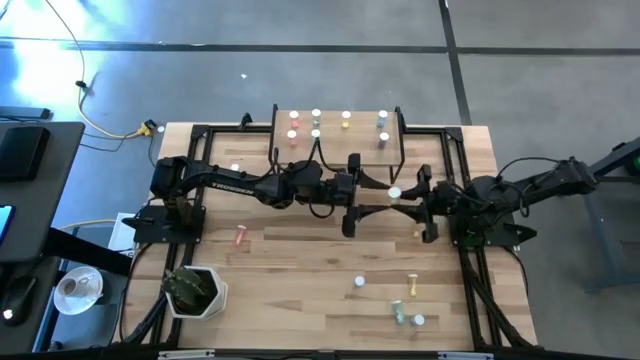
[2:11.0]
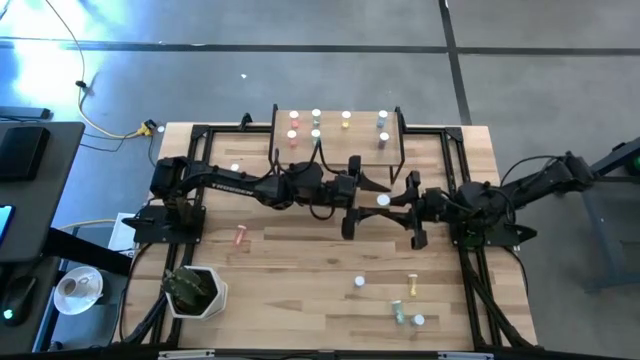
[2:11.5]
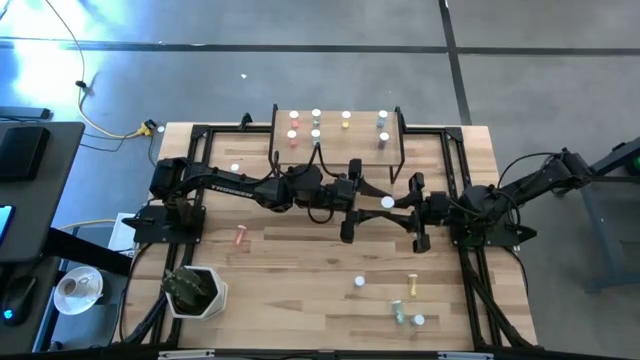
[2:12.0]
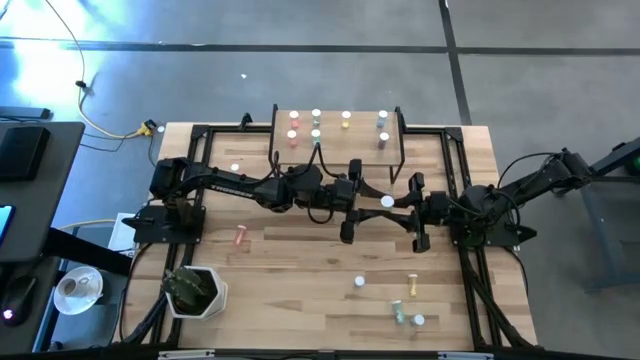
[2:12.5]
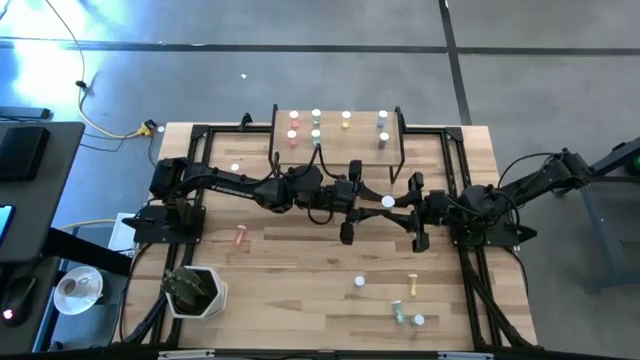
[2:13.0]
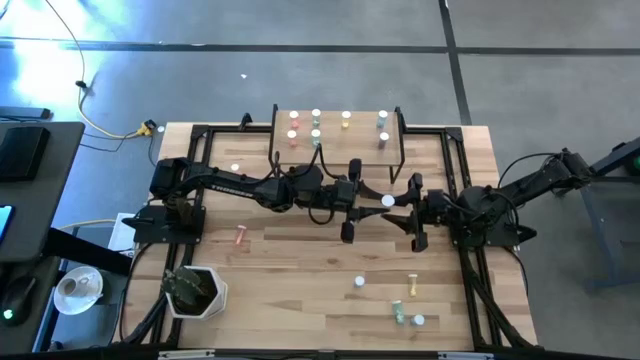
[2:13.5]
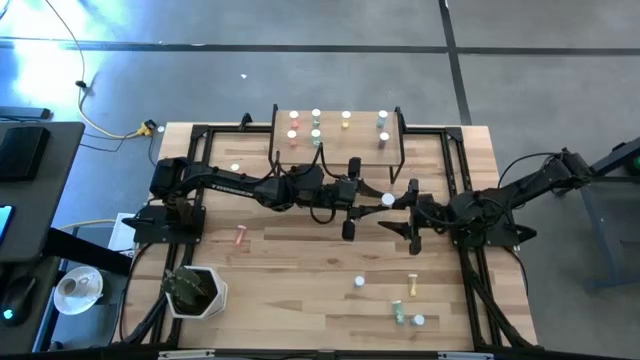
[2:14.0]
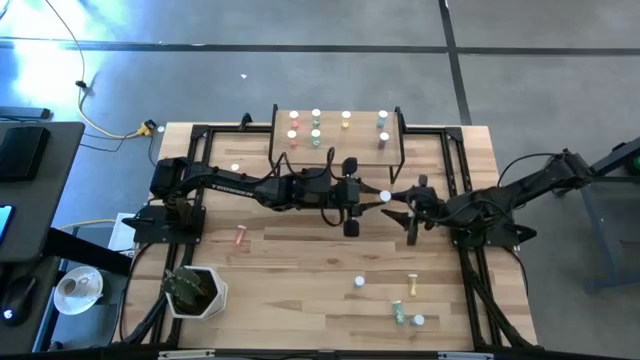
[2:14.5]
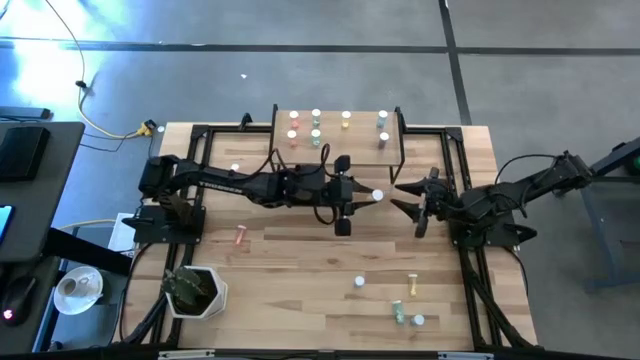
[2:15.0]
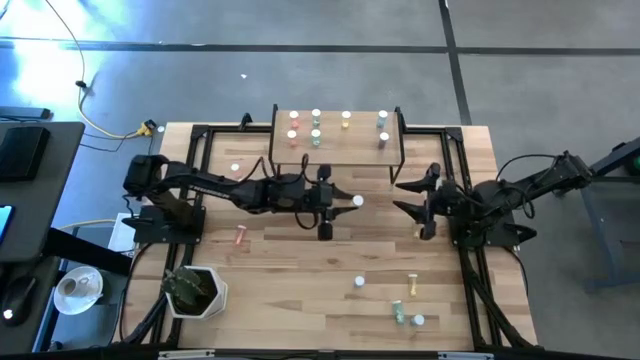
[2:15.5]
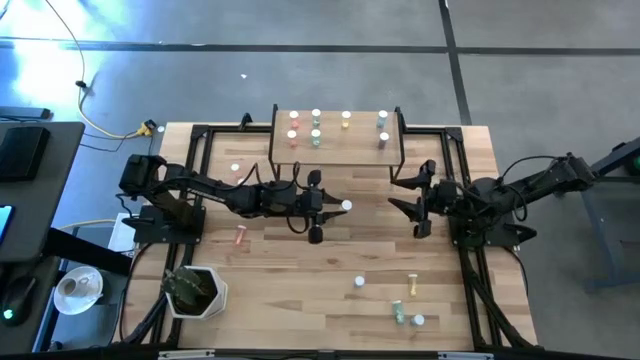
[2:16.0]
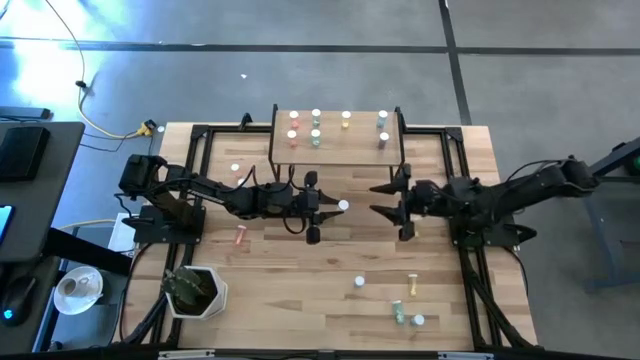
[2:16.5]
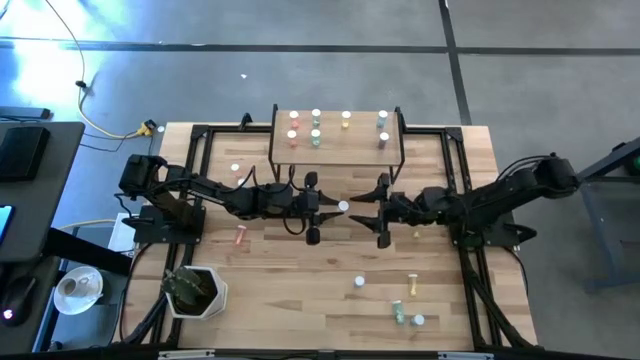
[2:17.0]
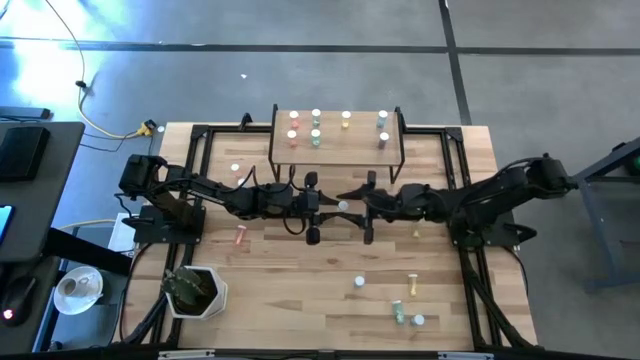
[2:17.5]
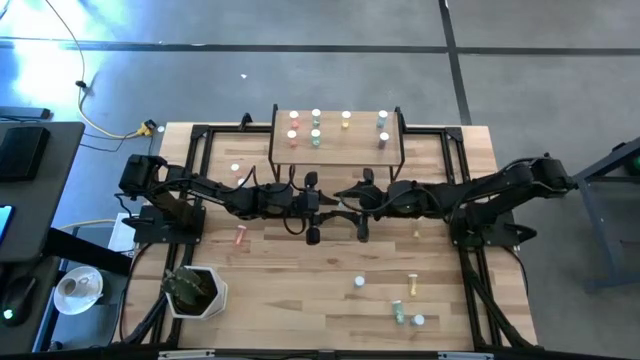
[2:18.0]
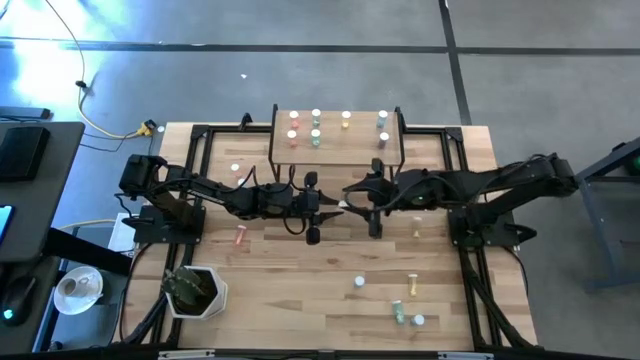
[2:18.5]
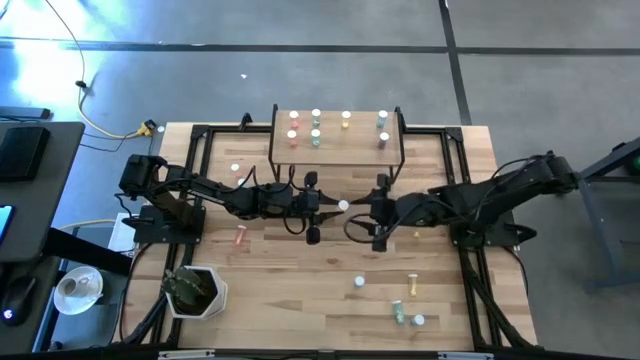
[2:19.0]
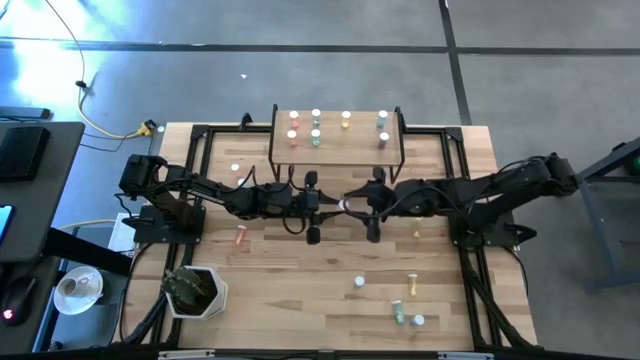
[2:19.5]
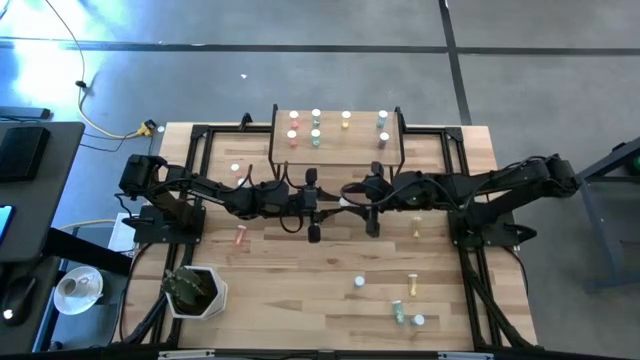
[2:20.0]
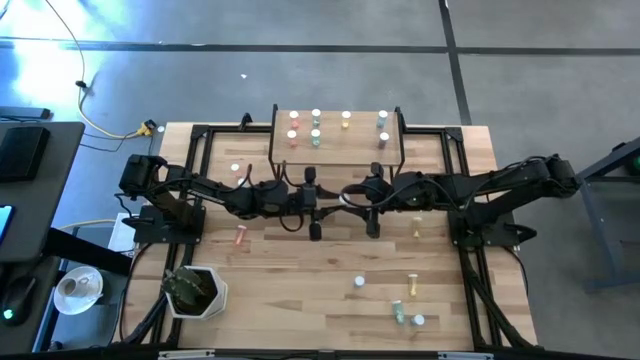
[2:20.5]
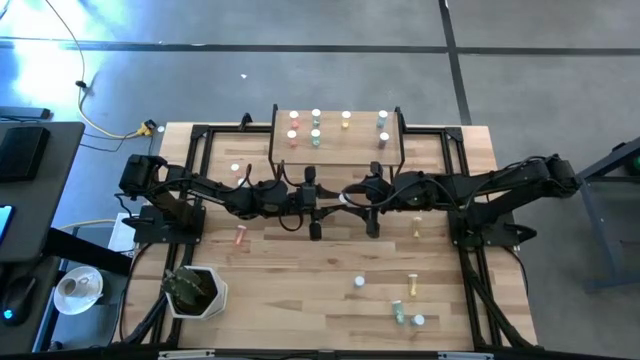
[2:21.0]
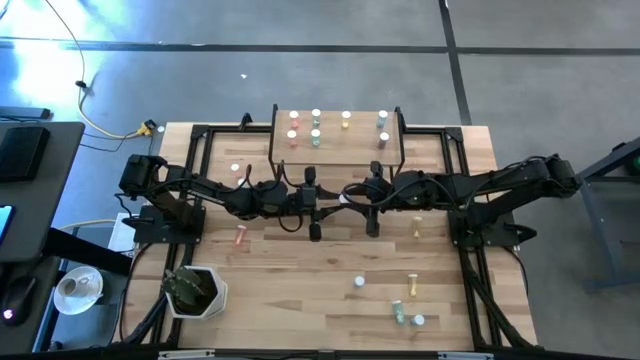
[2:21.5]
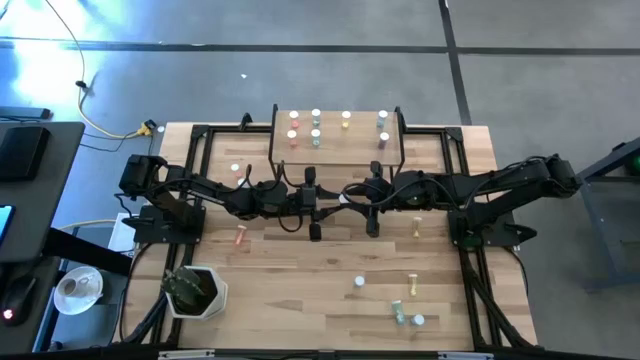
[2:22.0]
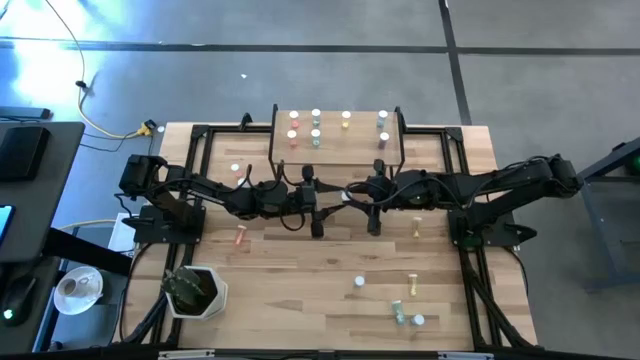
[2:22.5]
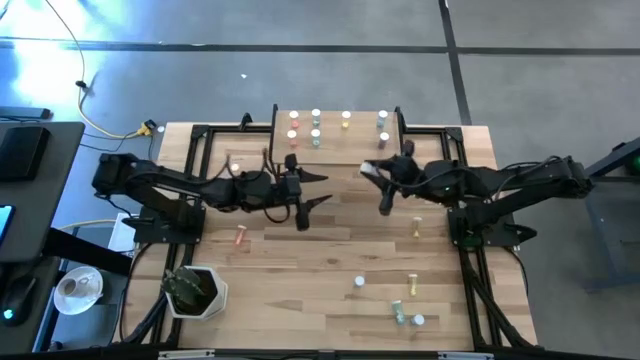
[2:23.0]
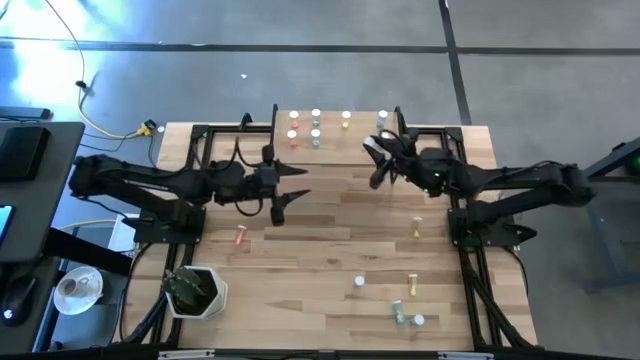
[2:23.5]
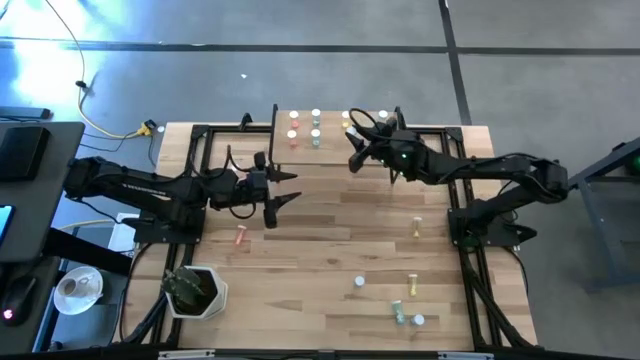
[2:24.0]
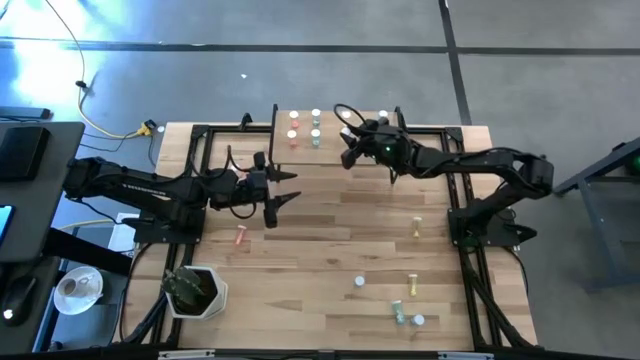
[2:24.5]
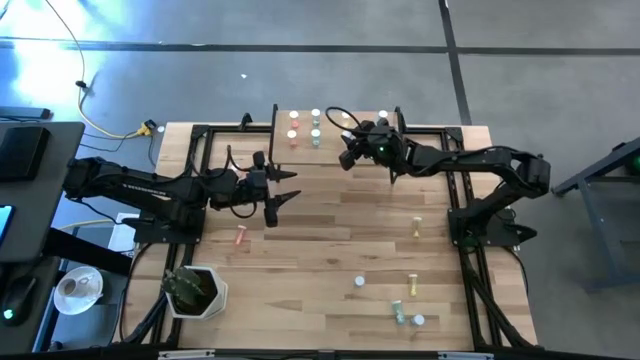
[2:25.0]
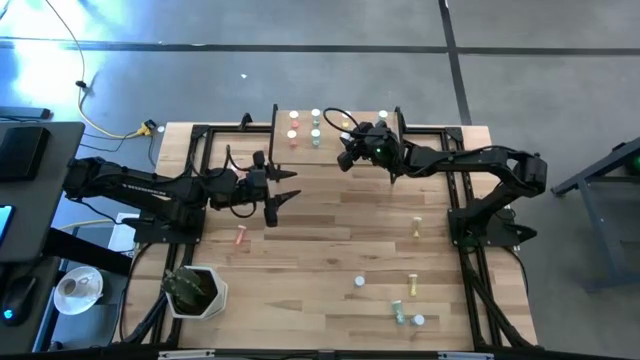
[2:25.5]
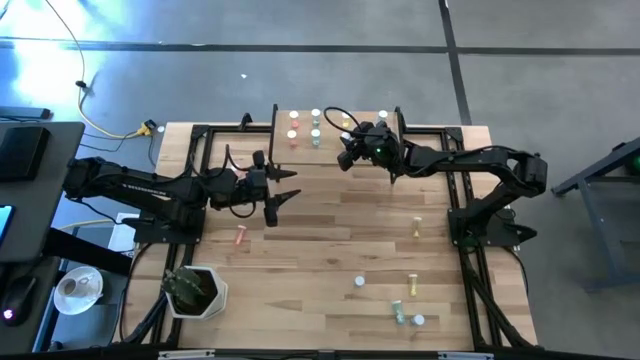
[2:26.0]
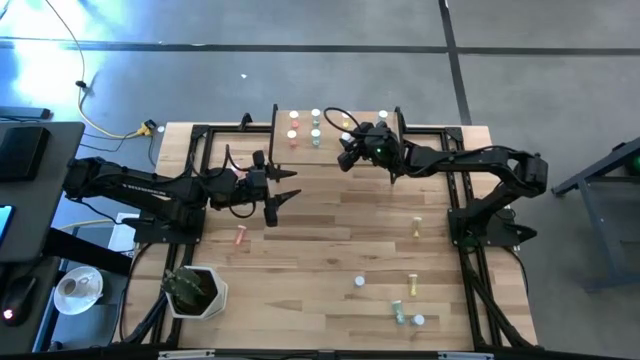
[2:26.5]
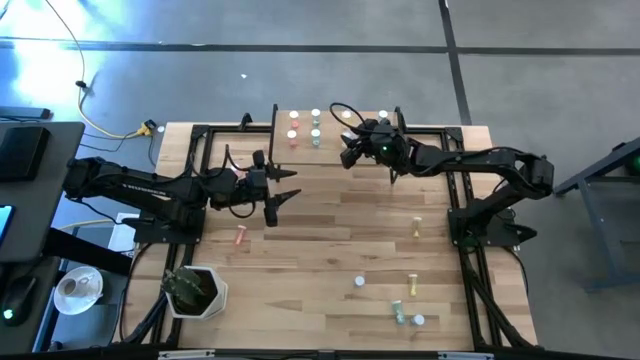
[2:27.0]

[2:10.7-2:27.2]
Task: Pick and place medicine bottles onto shelf by color
Put the yellow medicine bottle on the shelf

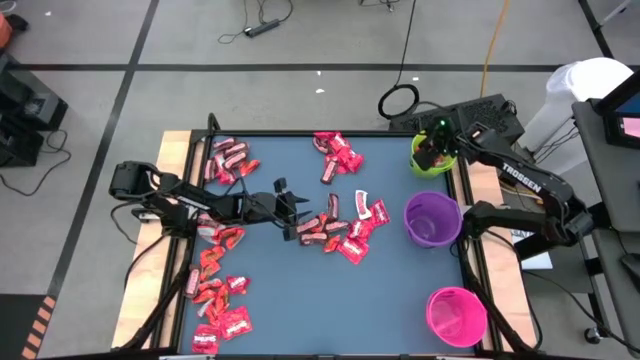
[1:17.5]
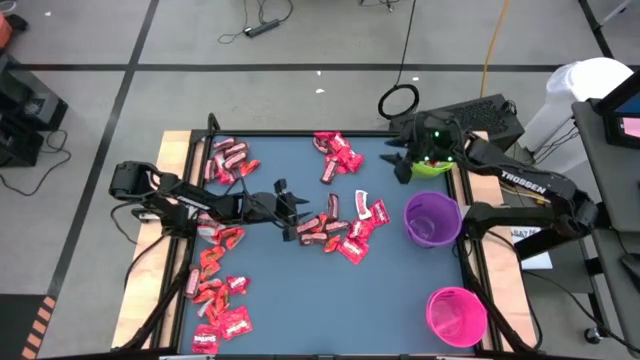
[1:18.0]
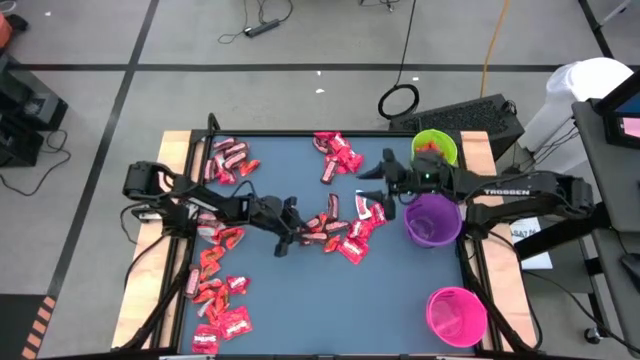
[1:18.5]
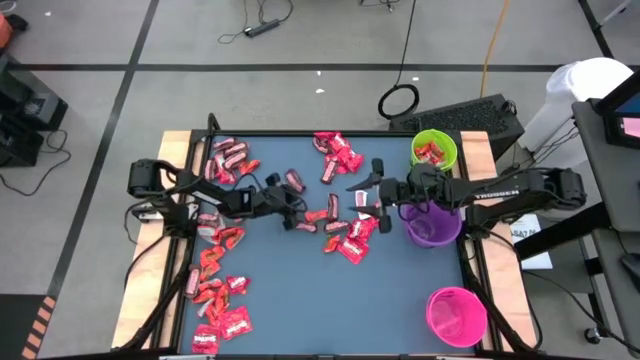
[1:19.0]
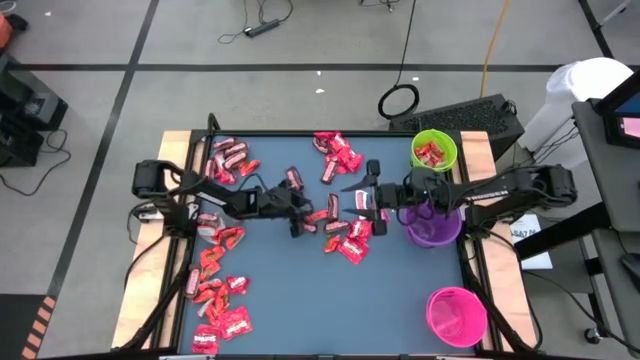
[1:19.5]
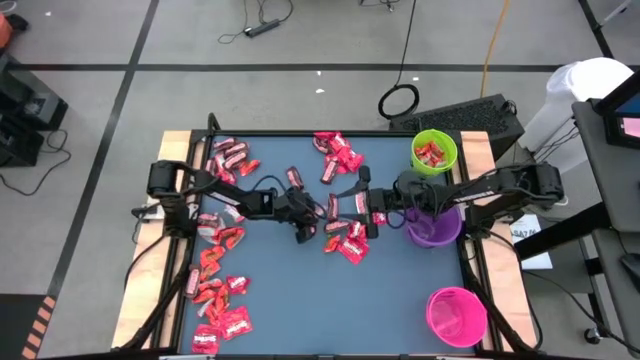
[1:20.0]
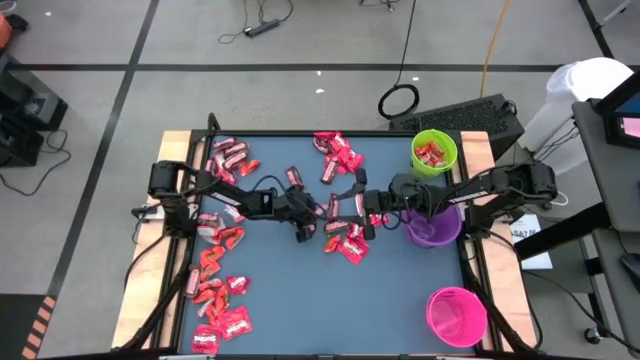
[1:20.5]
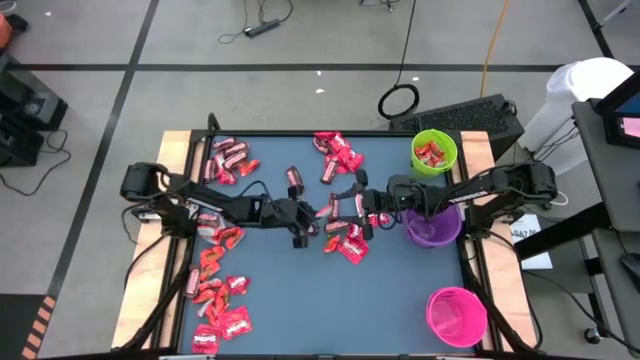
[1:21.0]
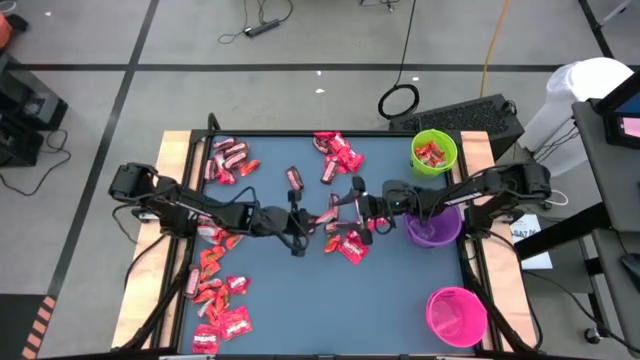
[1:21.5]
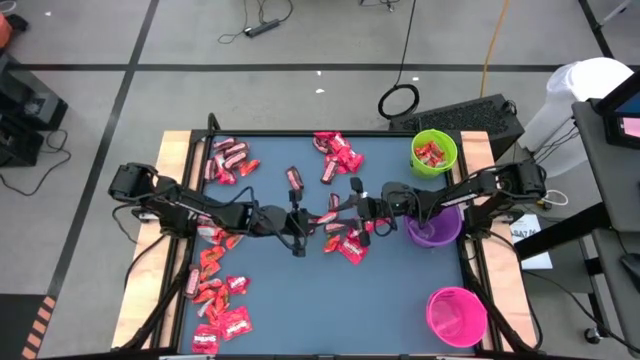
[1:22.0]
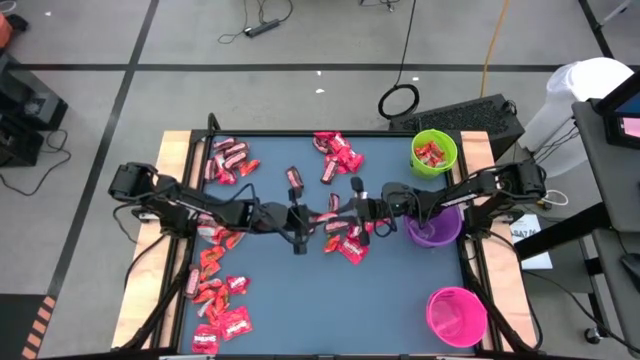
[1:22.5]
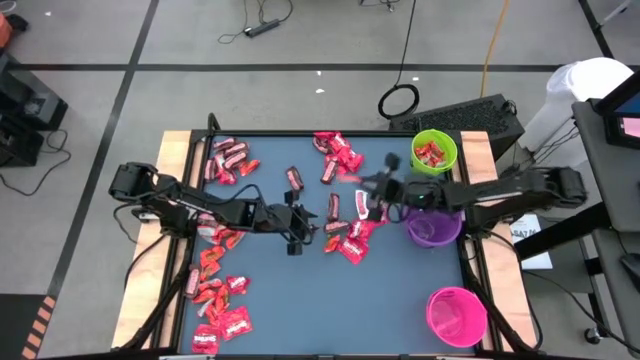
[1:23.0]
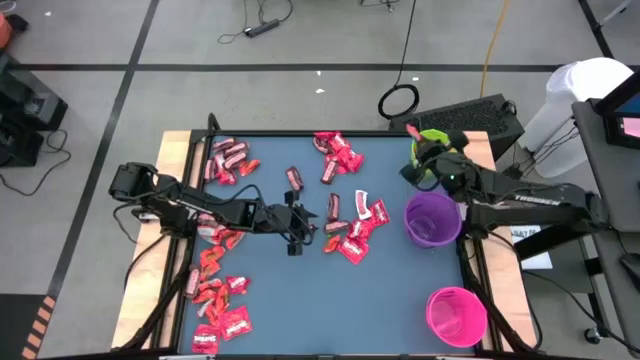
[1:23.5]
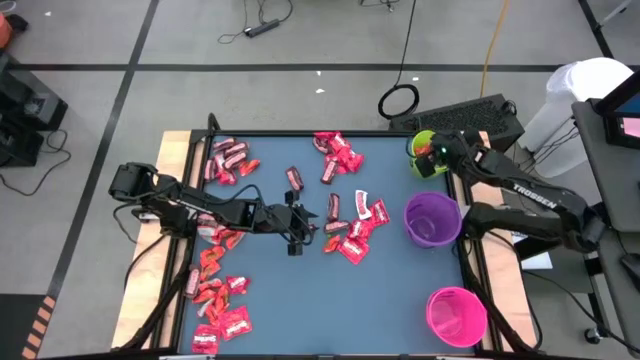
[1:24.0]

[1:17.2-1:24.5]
Task: Organize candy in baskets
Put the orange chocolate bar into the green bucket
